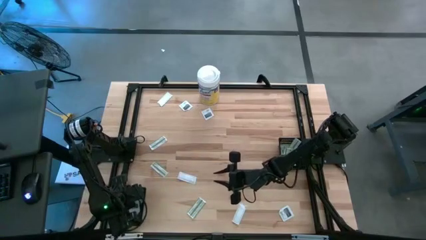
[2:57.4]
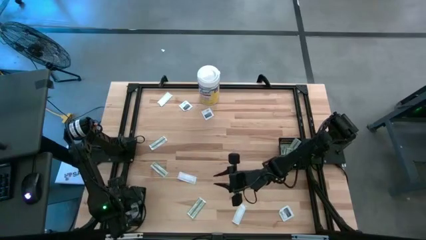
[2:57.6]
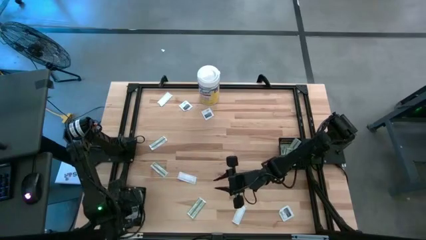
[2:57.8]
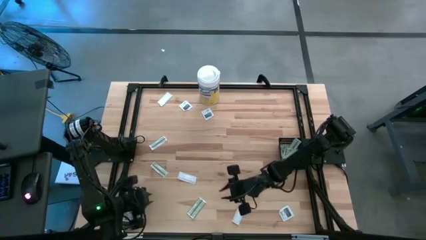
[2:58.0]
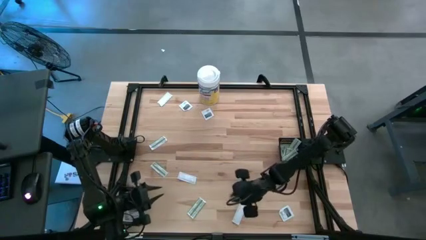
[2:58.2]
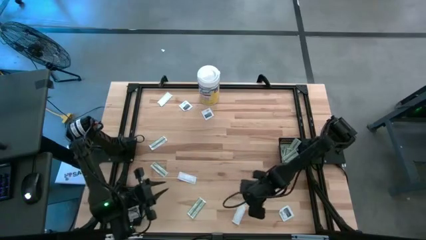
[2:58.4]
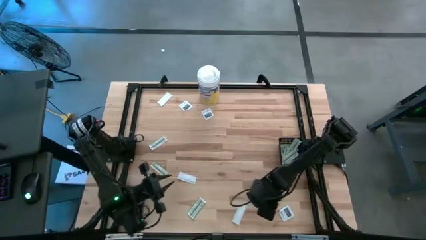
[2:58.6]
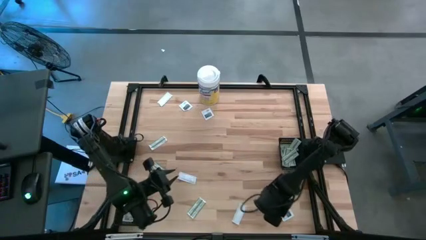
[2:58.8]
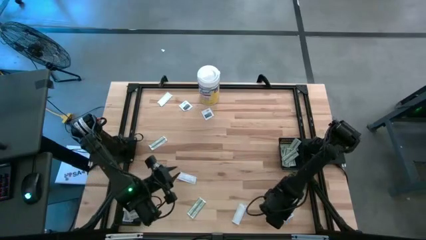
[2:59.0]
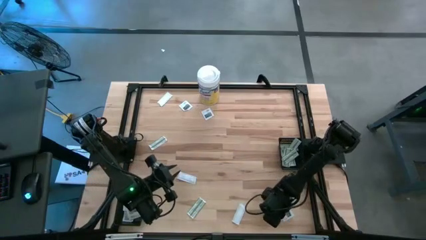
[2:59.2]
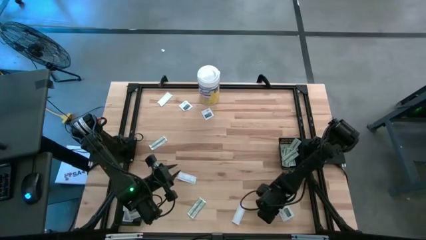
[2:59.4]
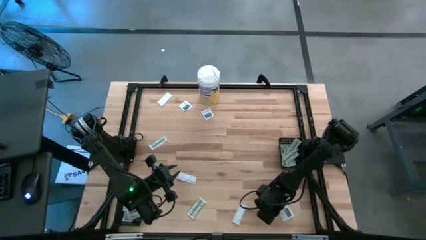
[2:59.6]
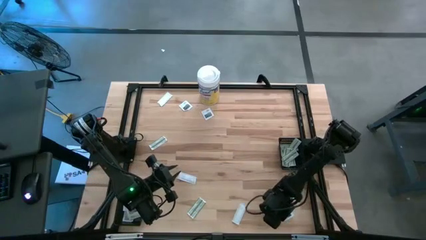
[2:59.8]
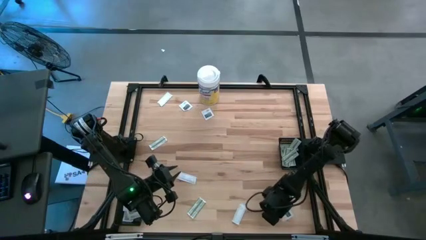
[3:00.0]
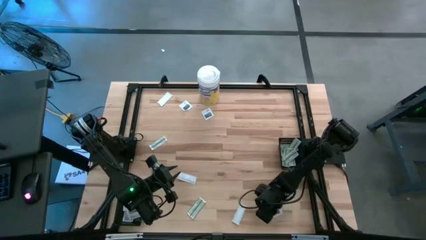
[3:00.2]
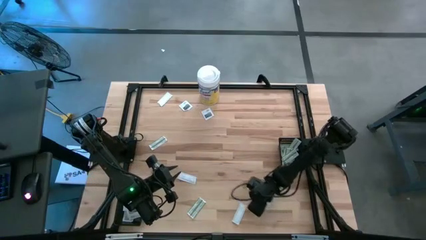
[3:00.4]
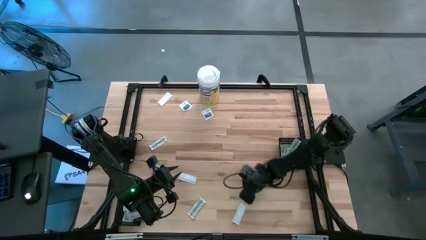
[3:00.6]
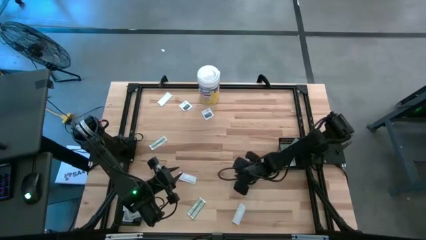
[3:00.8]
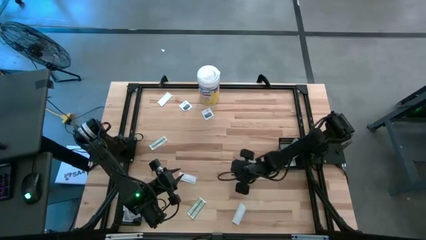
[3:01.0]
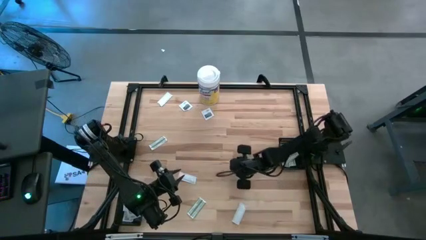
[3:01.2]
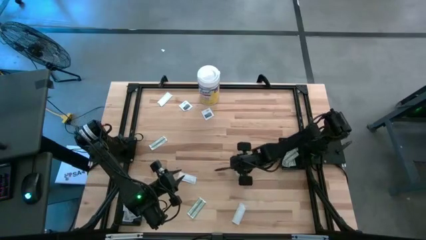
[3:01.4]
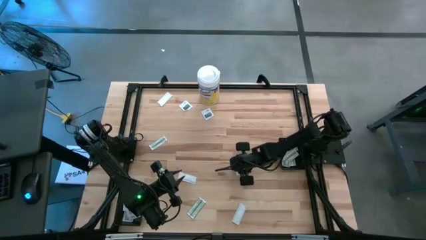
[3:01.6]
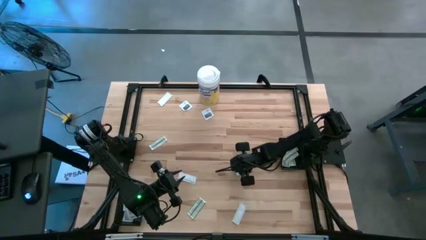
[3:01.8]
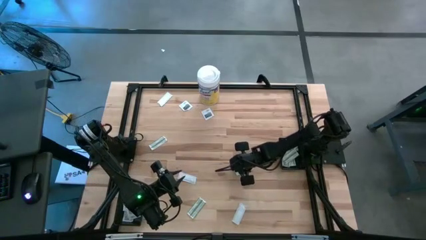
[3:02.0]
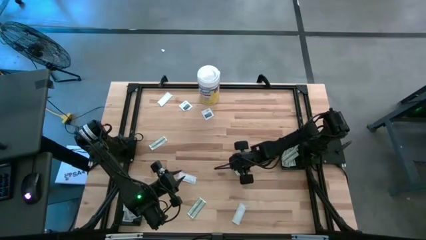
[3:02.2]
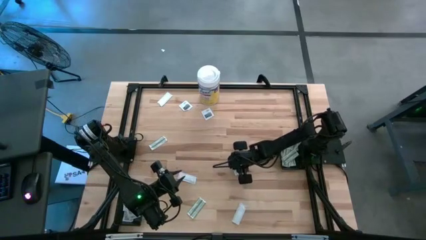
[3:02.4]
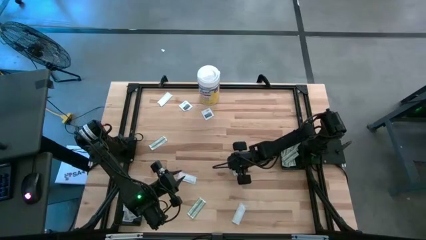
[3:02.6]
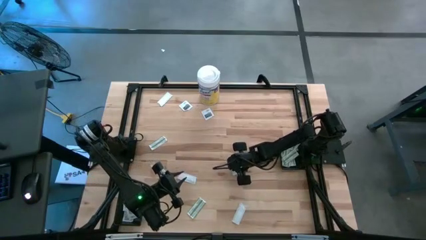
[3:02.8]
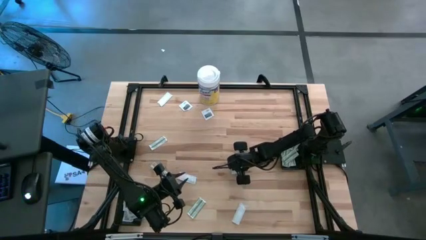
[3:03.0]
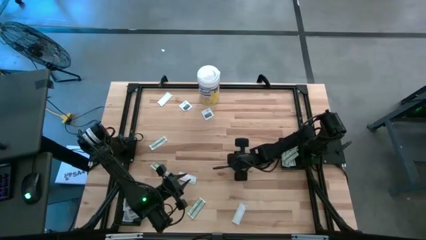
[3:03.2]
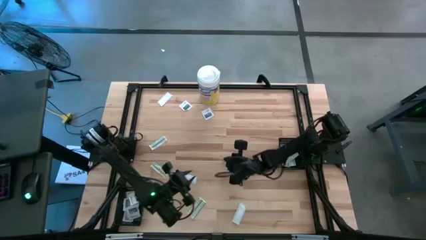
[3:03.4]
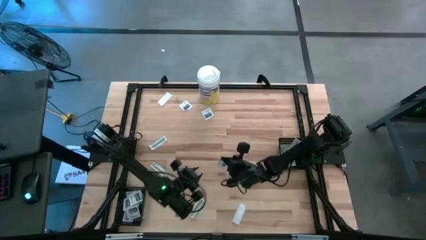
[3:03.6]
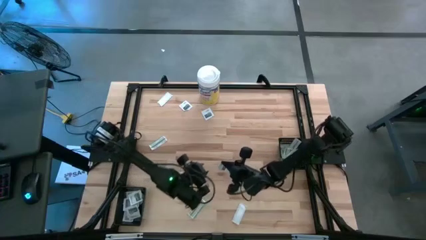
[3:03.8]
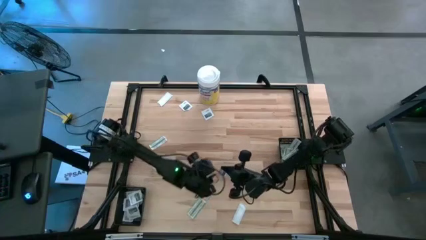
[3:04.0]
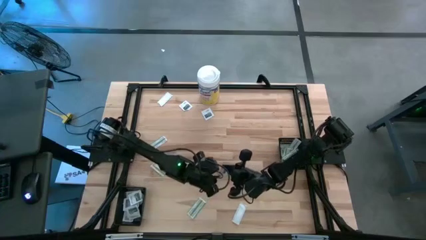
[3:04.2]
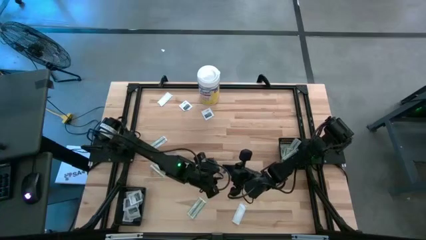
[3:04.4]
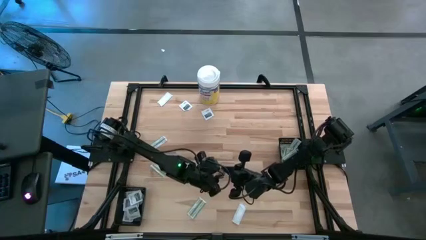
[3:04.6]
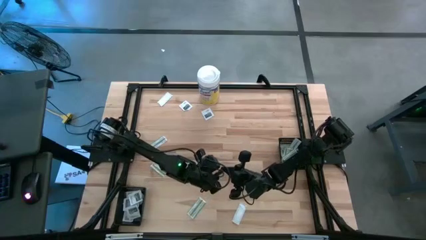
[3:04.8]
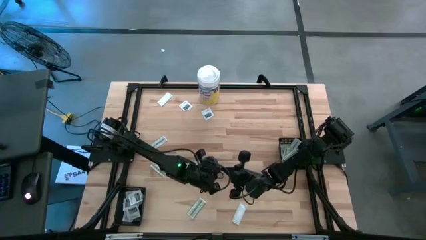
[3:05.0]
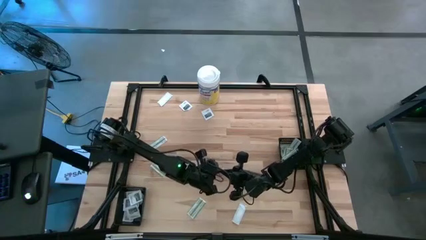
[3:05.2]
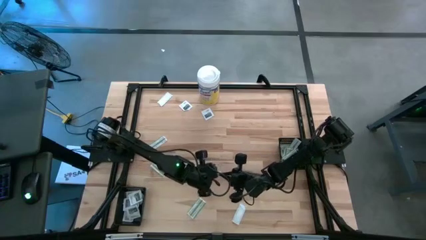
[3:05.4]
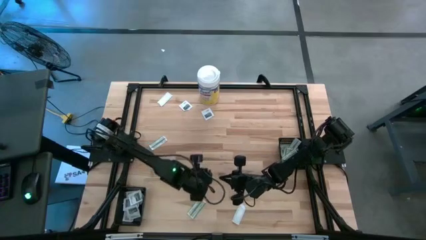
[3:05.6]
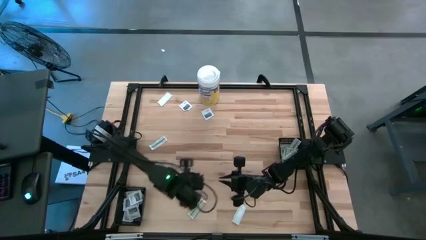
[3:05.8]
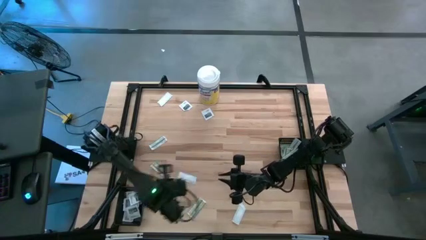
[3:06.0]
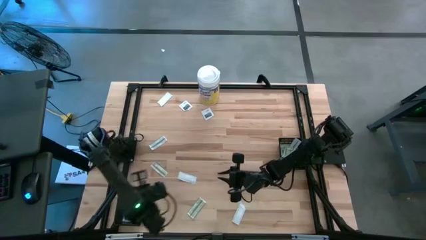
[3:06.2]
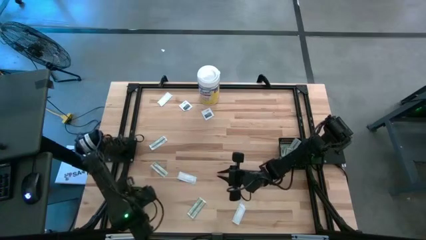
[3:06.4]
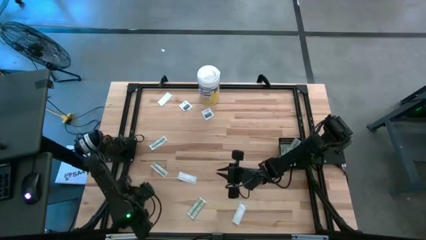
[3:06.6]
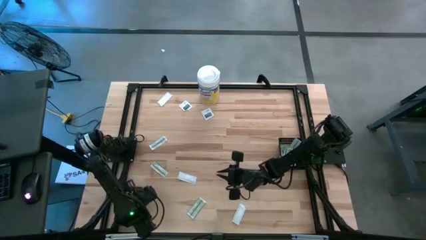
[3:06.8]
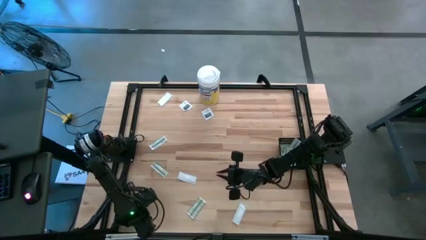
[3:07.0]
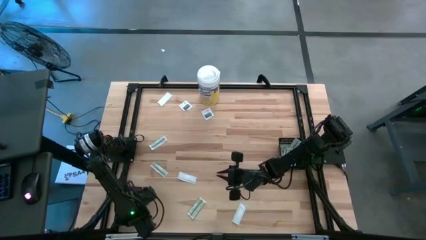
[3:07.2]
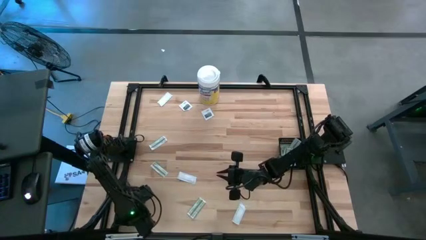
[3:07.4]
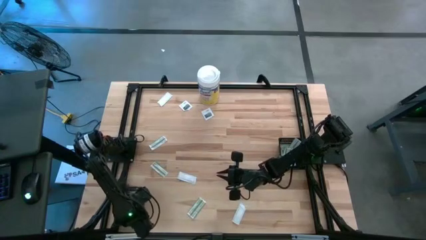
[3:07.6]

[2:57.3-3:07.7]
Task: Pick & Place First Aid Supplies
Put the white towelette sachet into the left black bin
